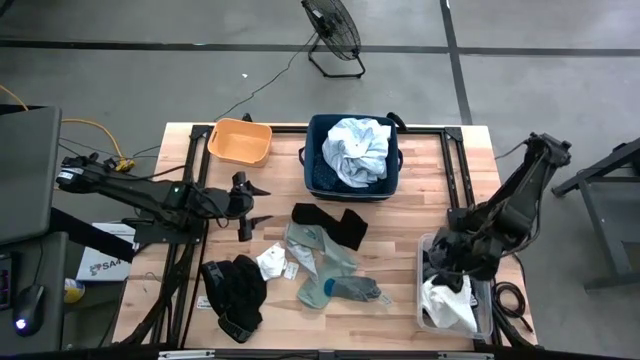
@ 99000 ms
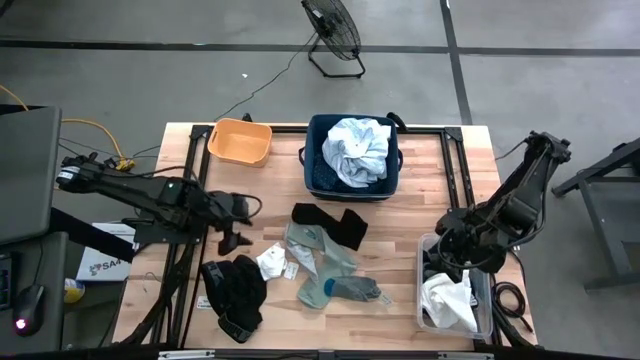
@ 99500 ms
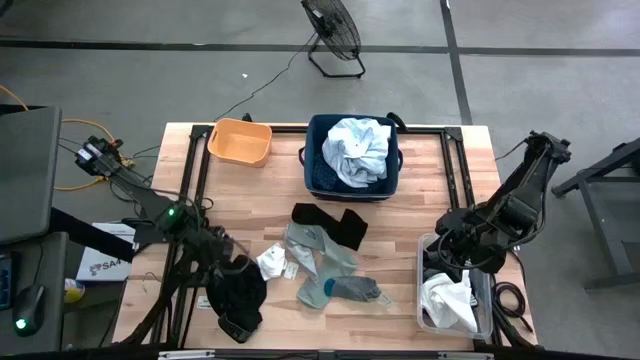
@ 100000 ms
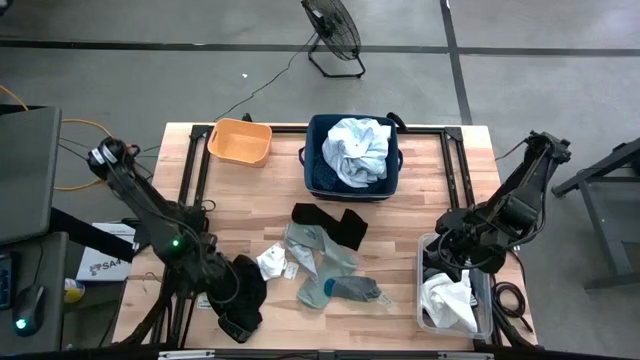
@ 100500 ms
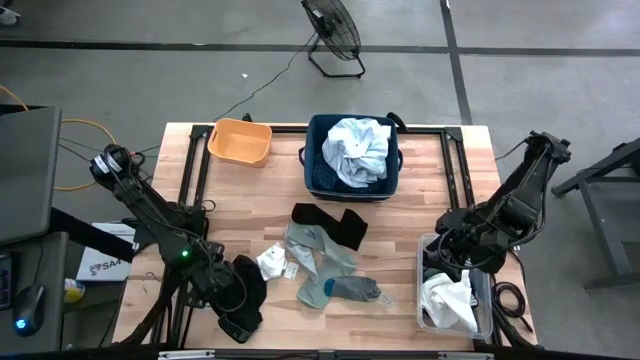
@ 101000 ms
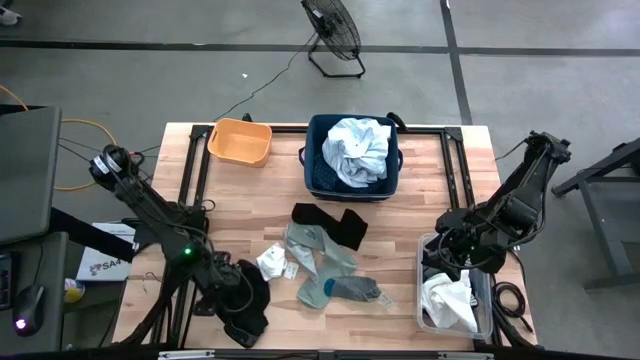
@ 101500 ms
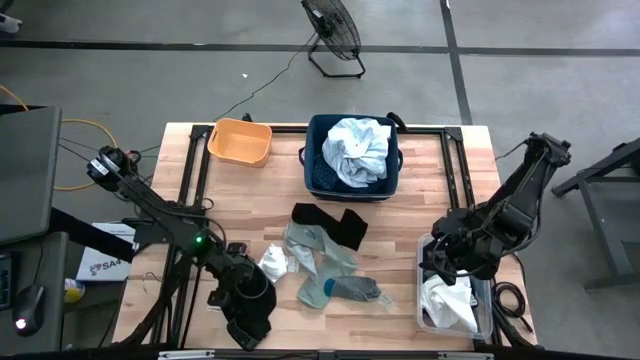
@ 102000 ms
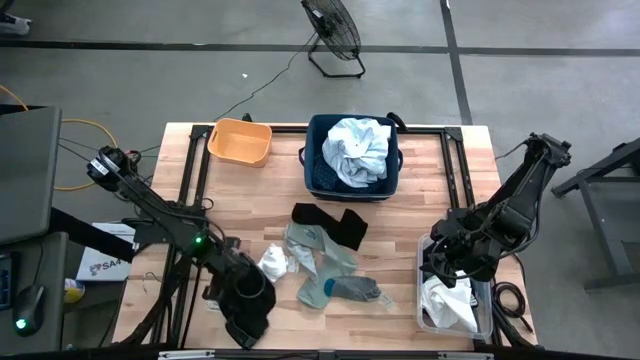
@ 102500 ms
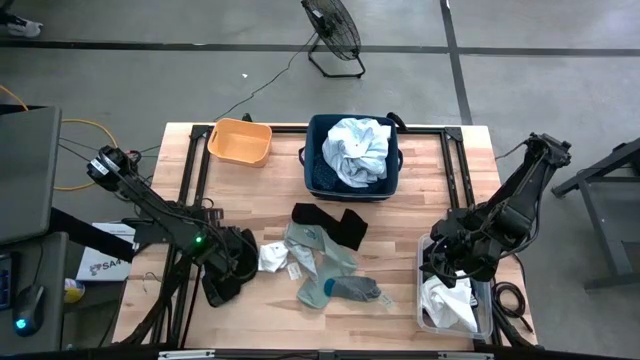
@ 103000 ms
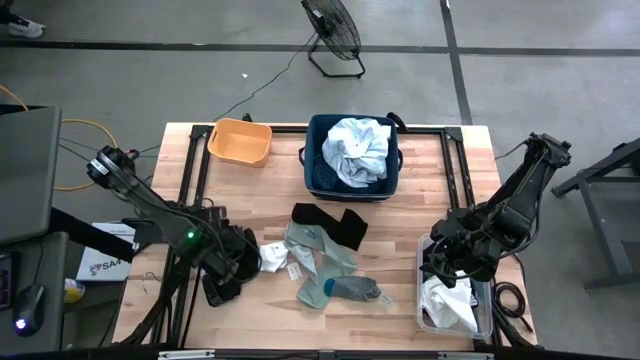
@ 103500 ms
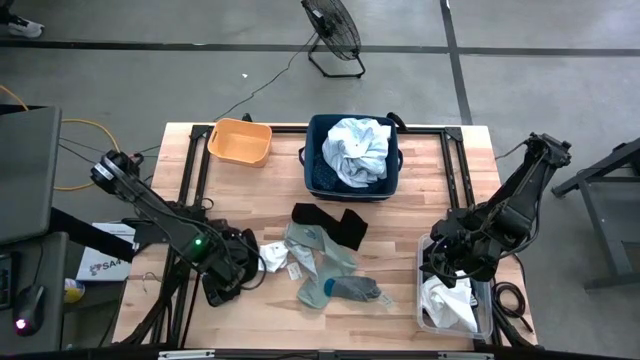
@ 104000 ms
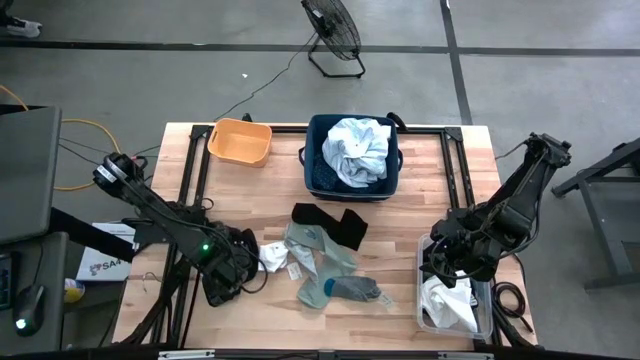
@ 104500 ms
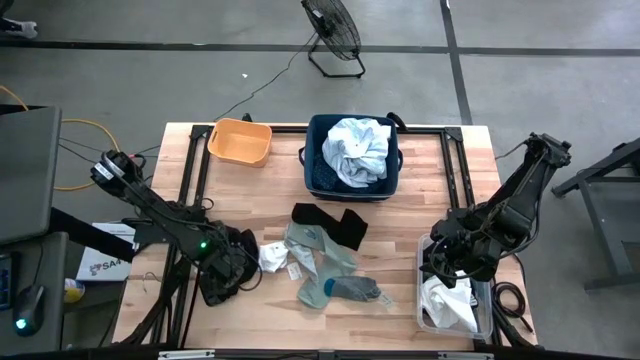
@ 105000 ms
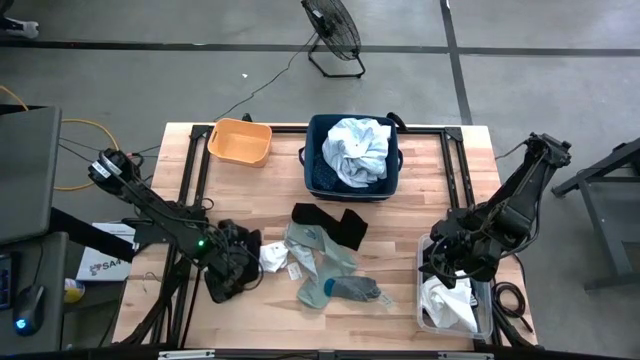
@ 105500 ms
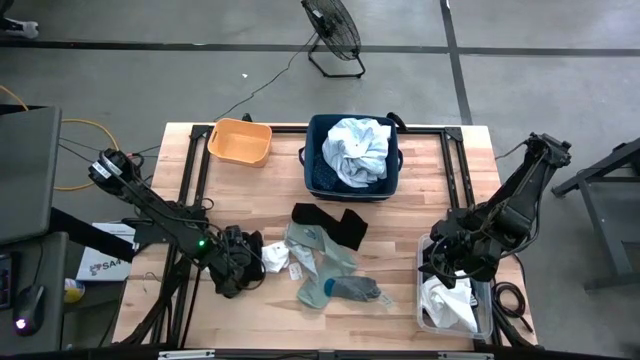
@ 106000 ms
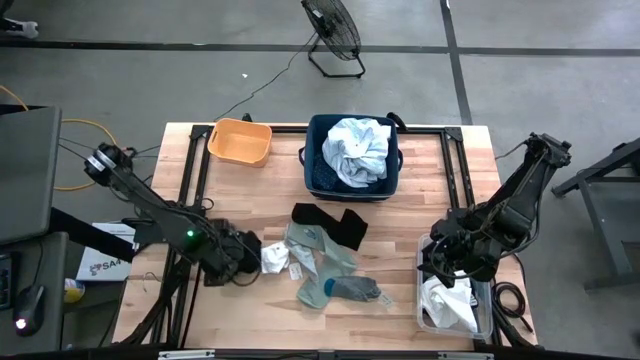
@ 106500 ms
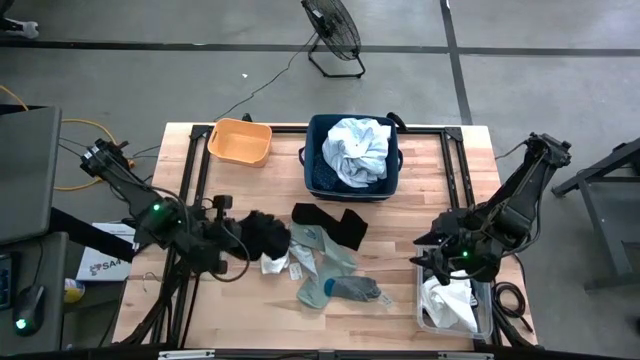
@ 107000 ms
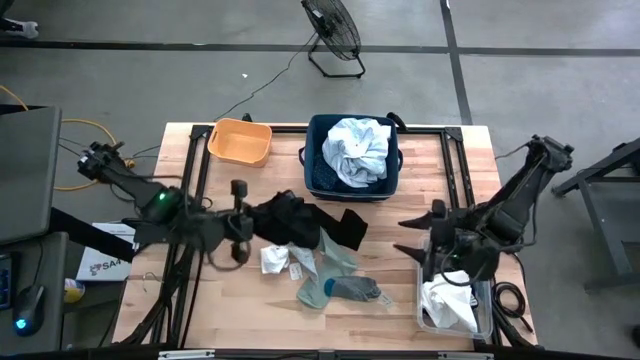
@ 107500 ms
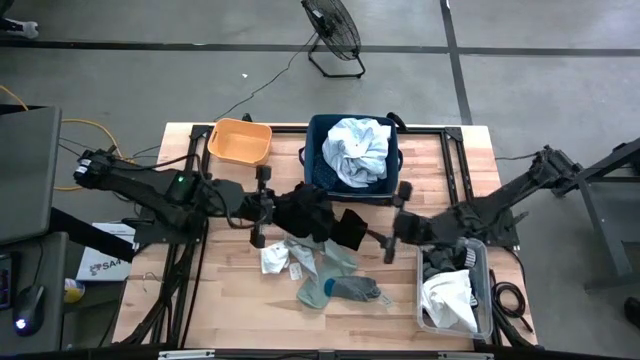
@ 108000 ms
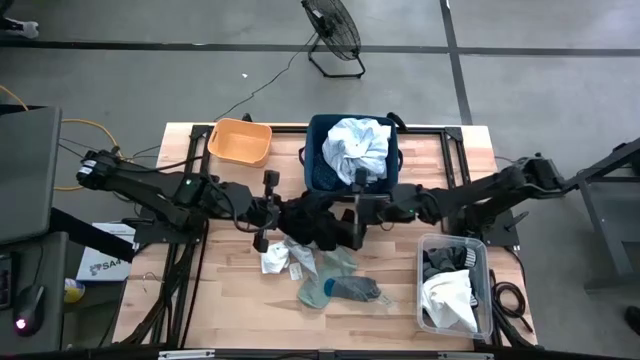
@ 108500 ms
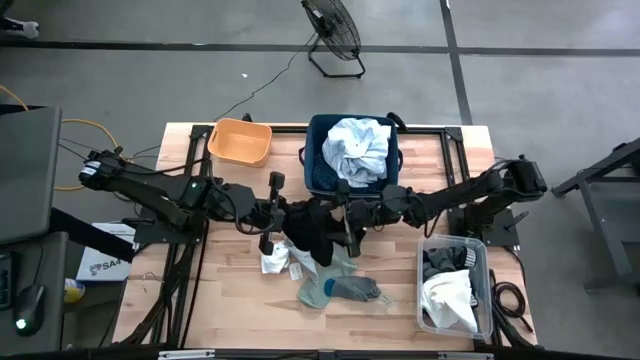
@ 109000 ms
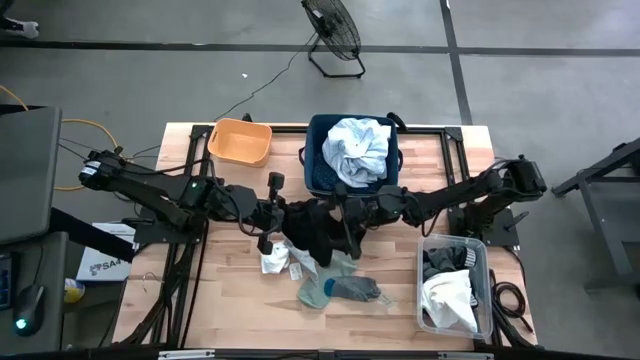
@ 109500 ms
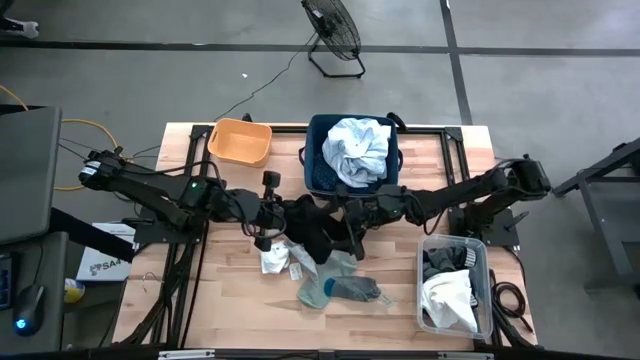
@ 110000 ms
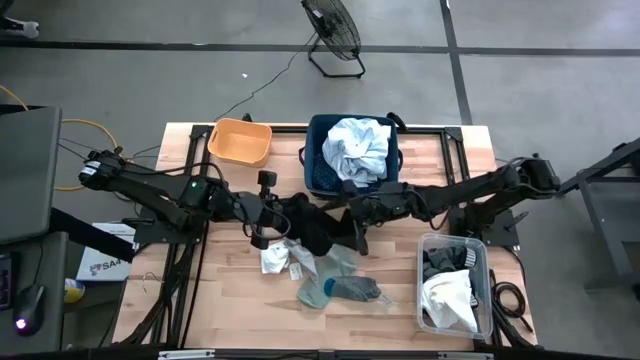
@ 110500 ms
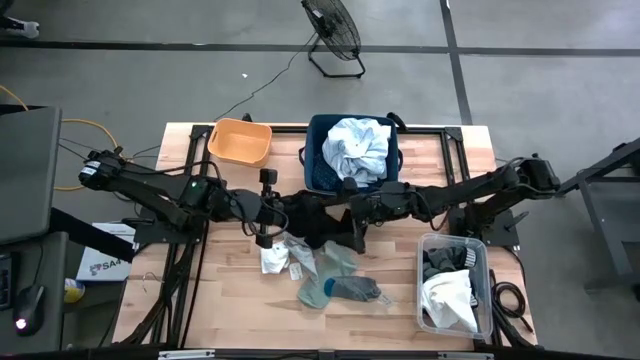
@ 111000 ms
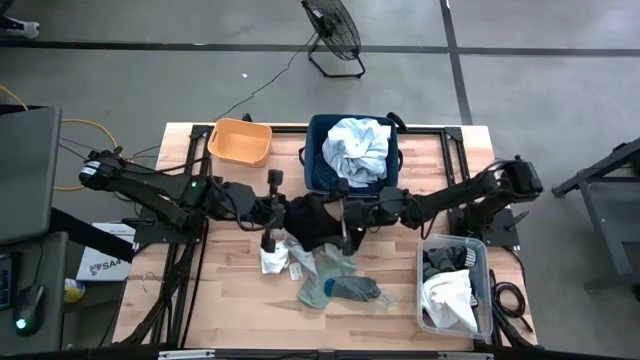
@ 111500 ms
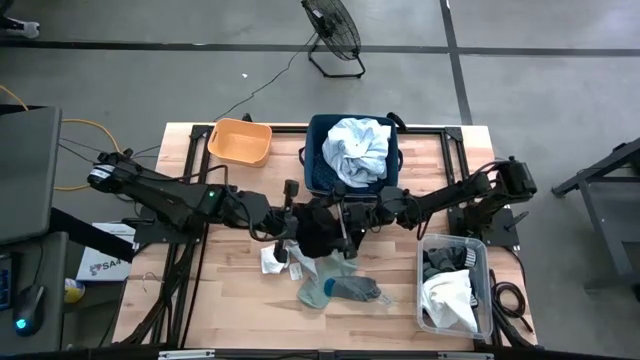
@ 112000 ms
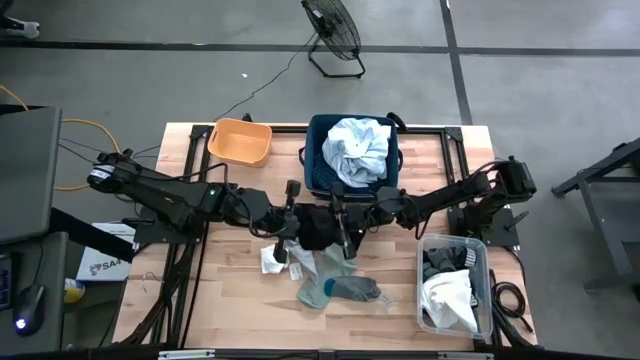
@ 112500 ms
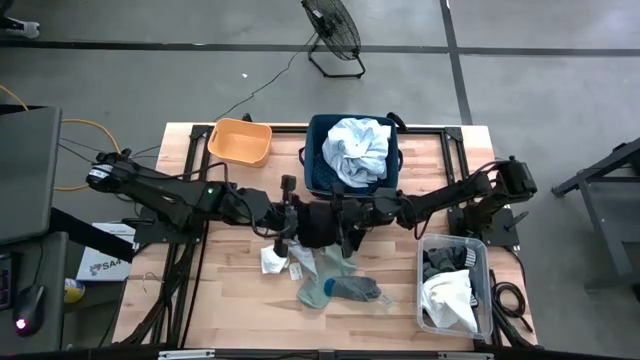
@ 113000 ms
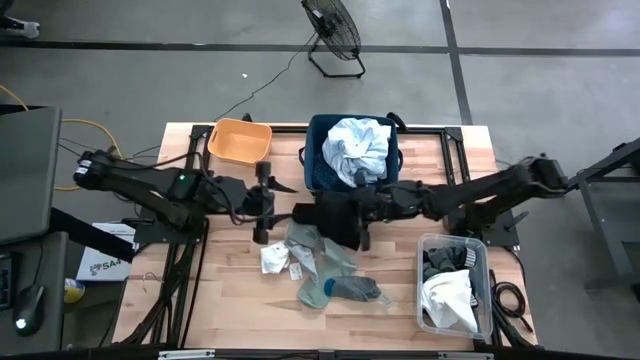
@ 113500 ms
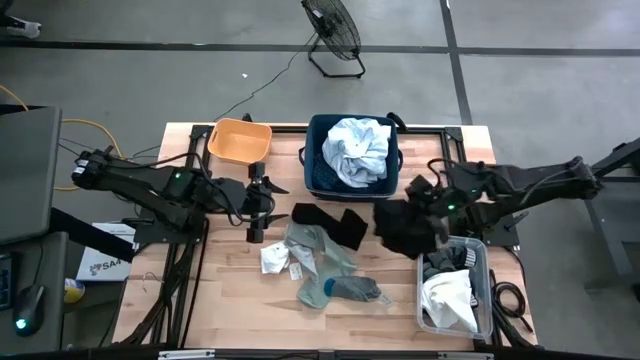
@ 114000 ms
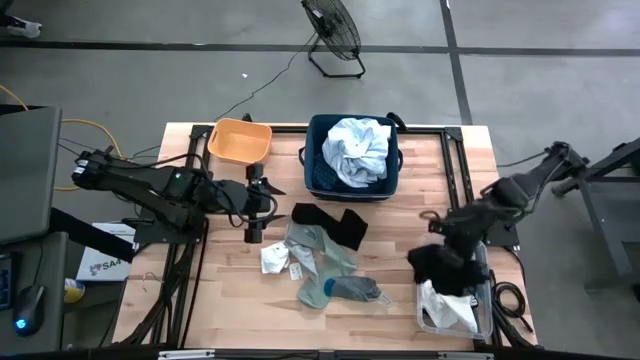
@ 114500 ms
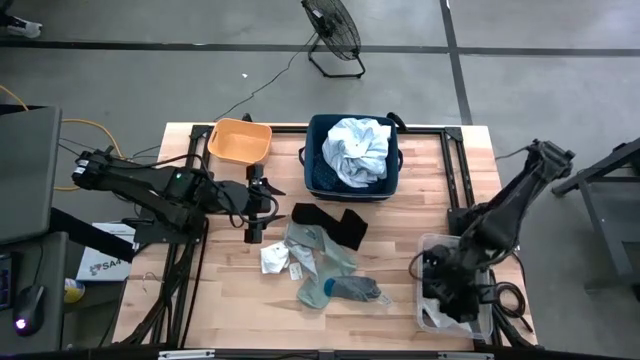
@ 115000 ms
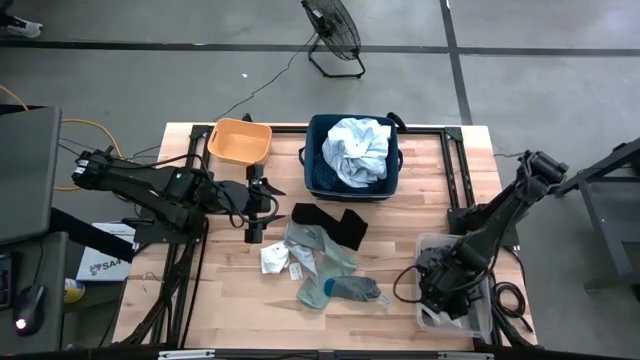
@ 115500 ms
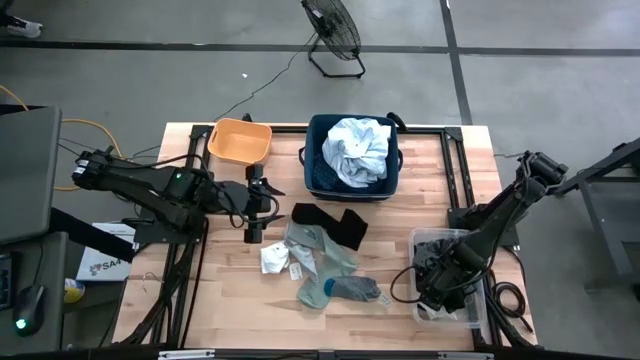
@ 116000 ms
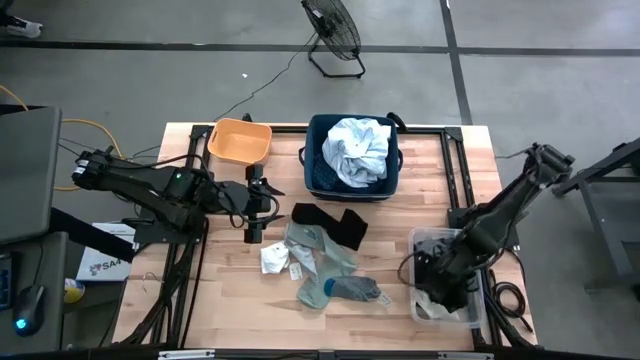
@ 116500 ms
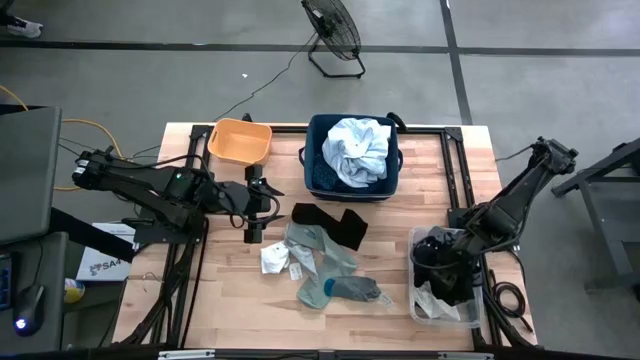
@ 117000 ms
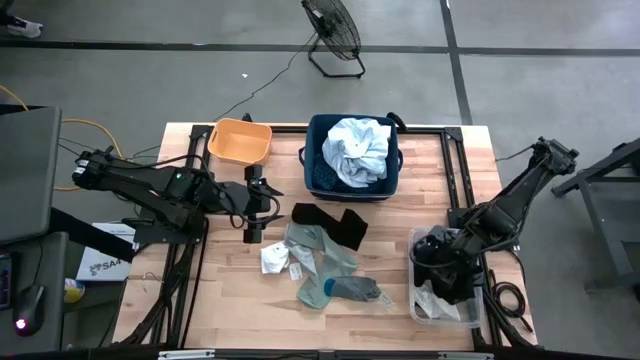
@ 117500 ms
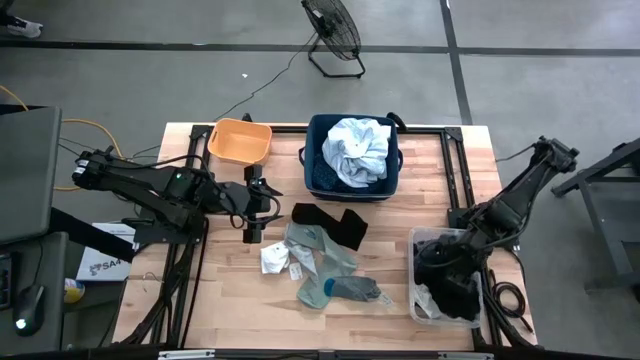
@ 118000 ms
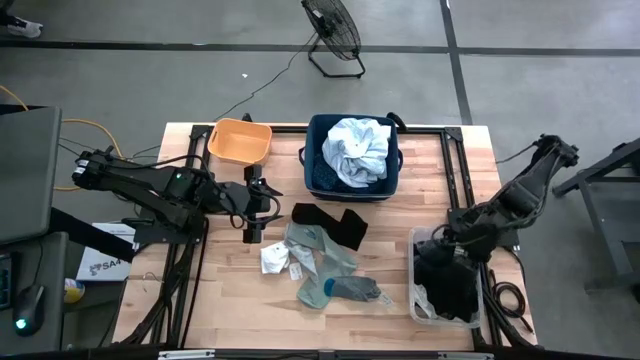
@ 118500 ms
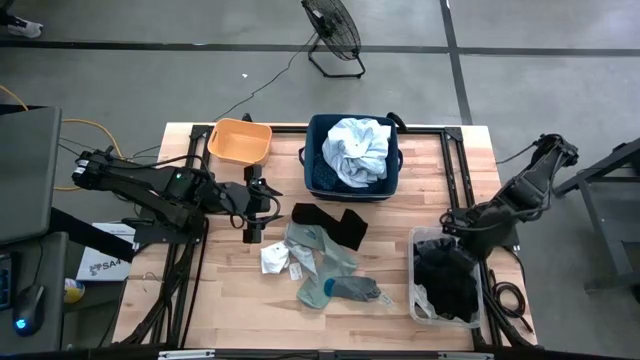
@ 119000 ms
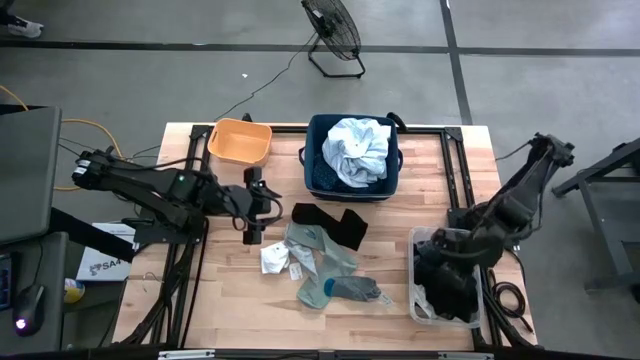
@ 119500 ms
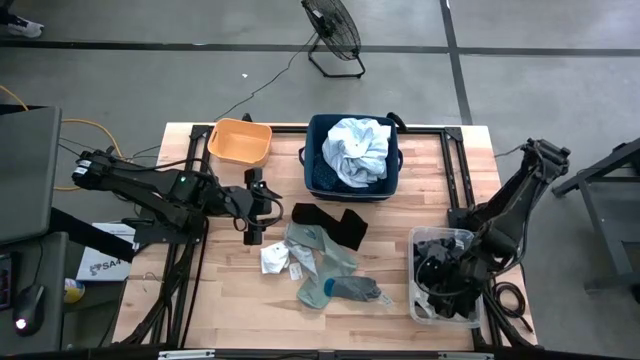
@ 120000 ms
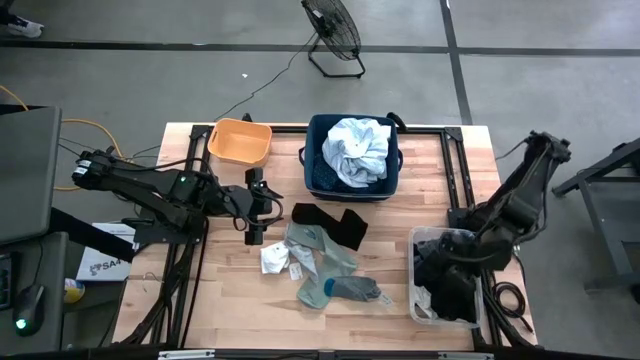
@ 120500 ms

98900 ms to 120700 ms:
Task: Pick & Place Cloths
Put the black boxer shorts into the transparent bin
